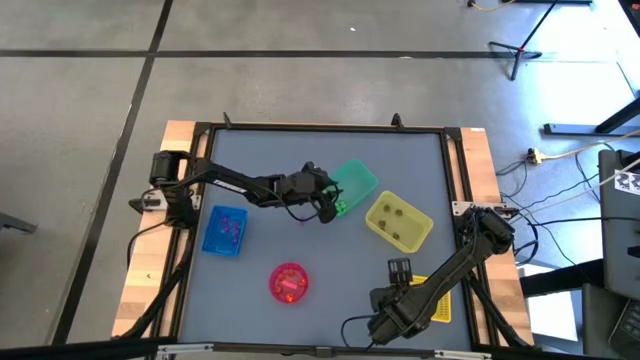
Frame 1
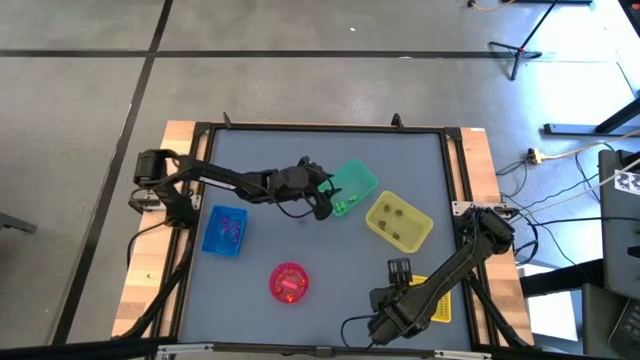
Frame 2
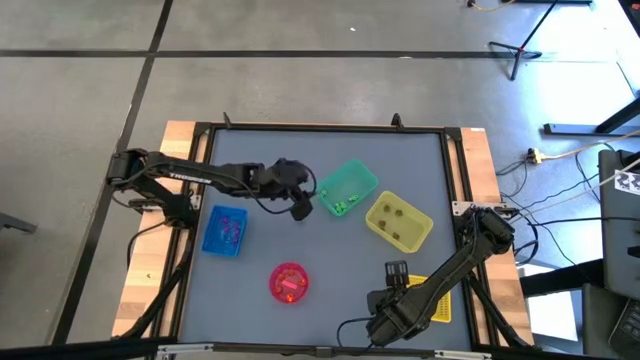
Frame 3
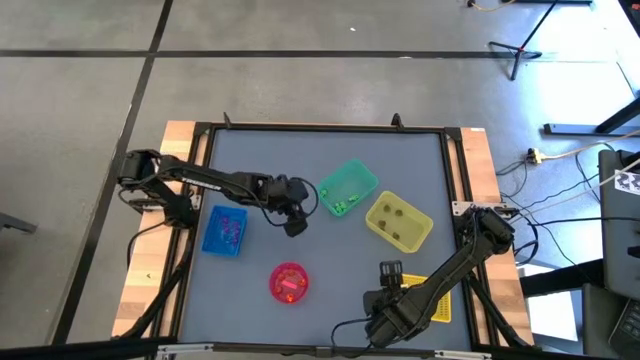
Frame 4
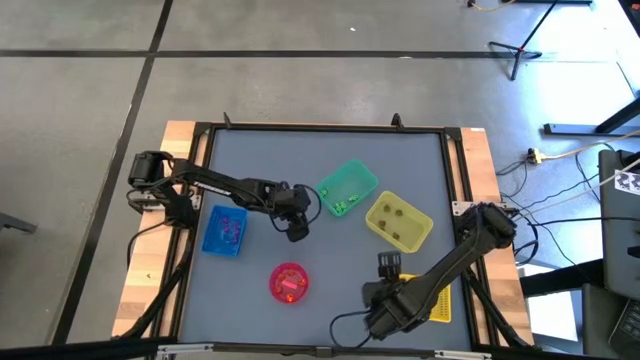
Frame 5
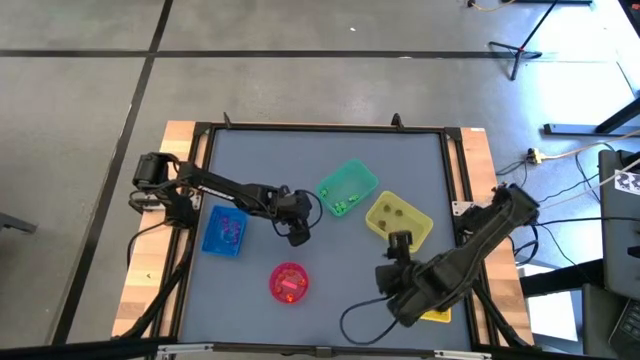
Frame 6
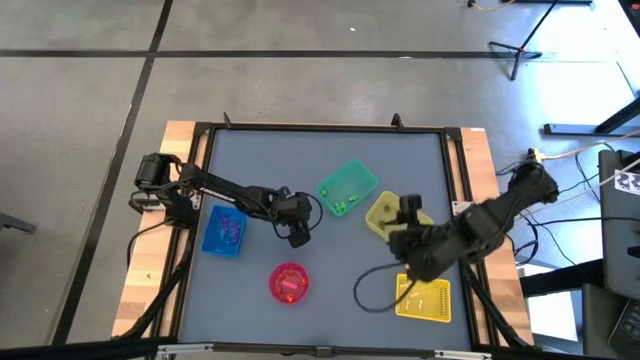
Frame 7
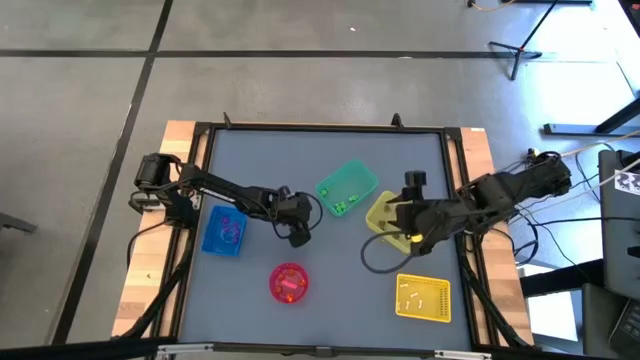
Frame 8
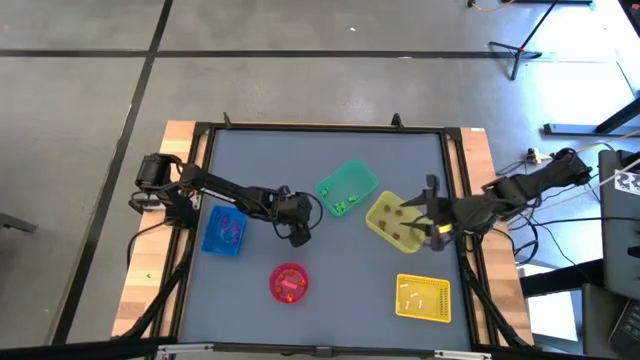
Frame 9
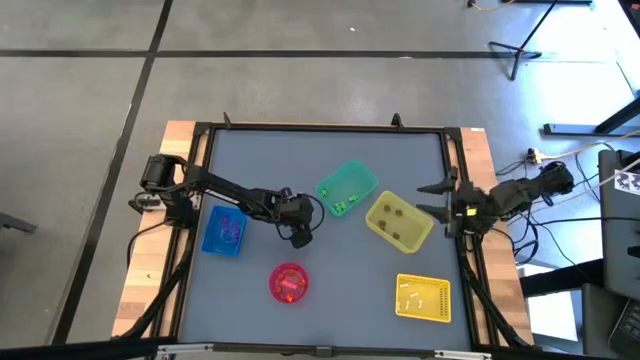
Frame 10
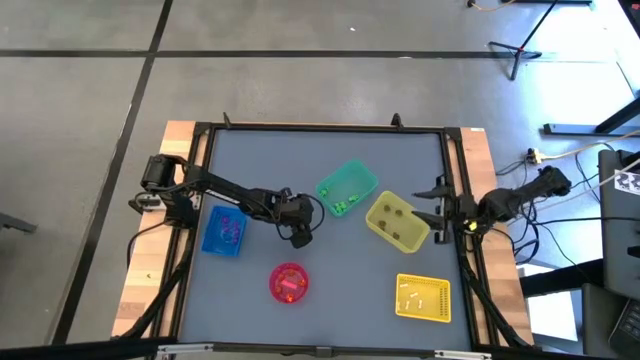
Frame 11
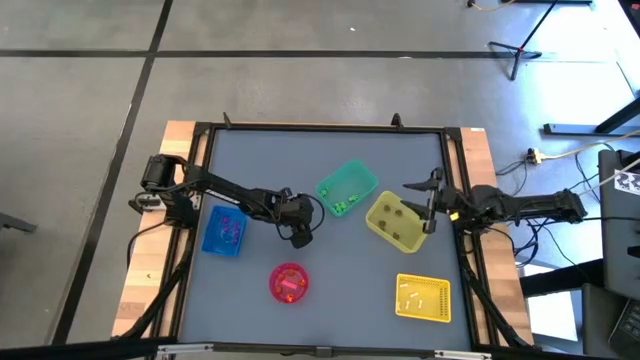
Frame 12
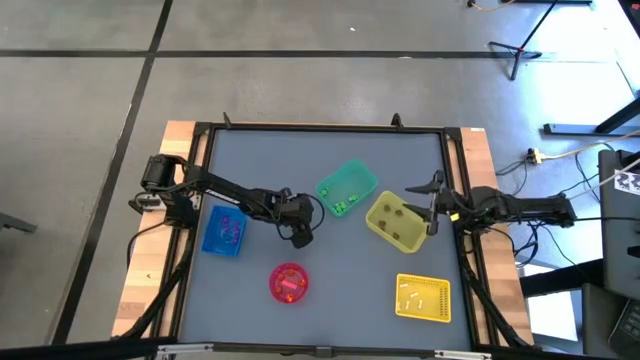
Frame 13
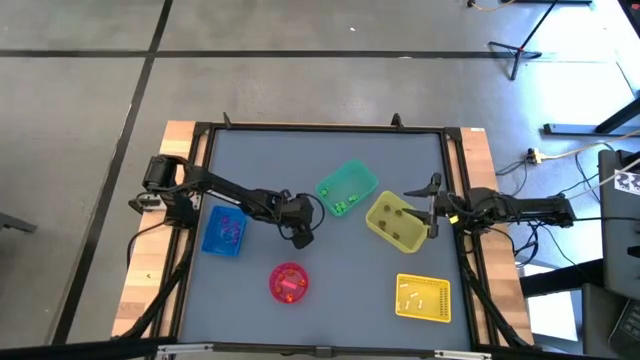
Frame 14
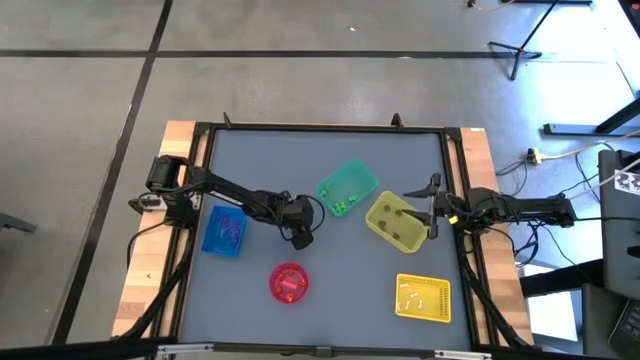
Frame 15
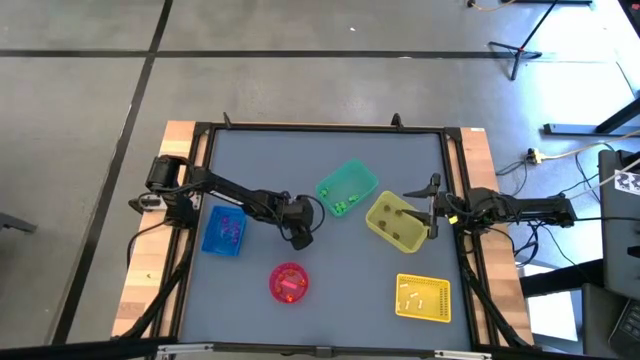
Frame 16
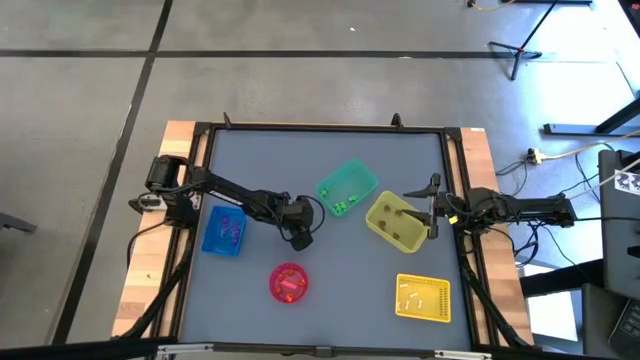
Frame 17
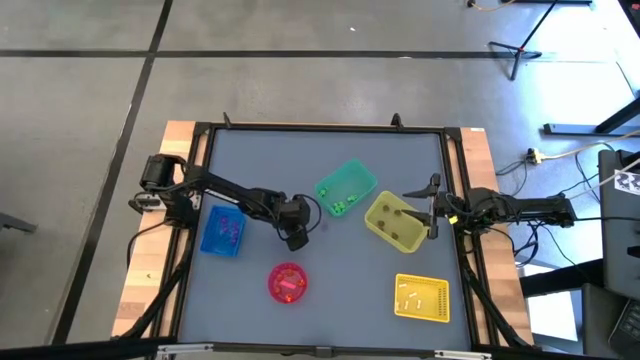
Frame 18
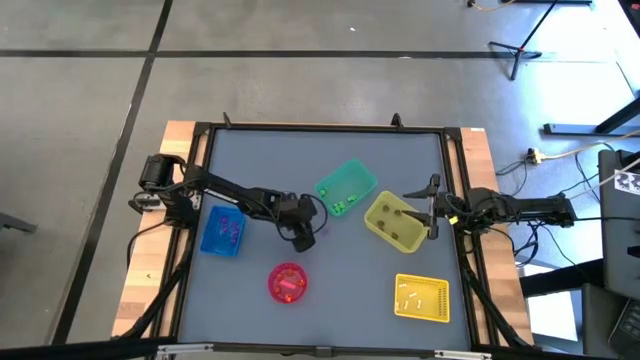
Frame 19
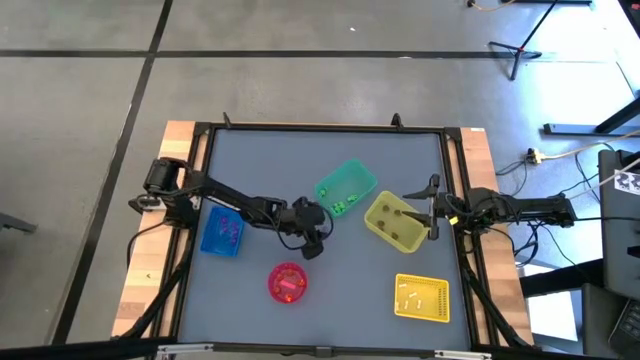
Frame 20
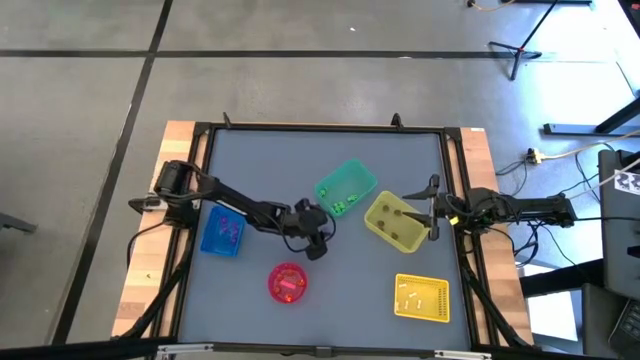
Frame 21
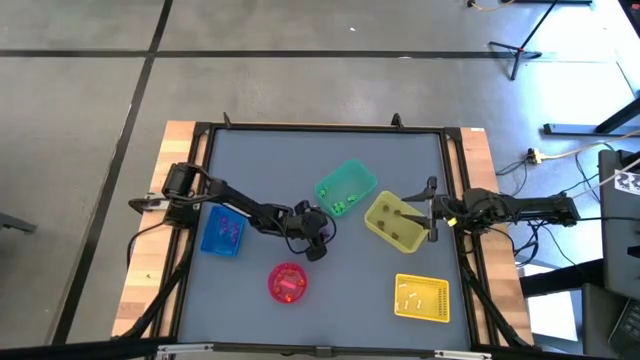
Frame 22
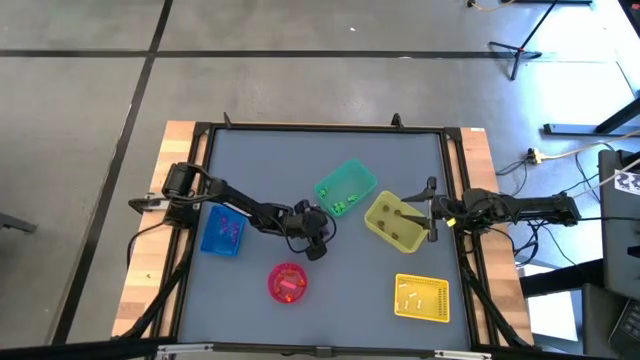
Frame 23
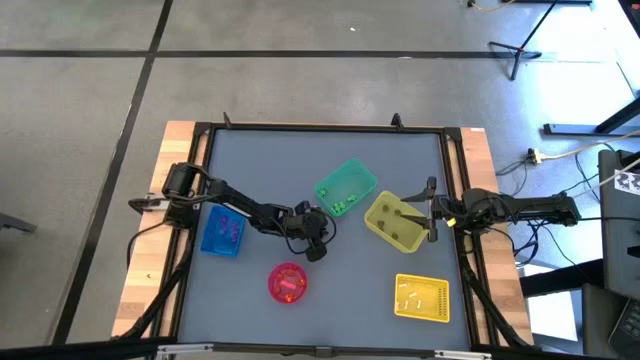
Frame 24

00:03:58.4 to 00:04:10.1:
Task: Sort Halloween decoration
Put the violet spider toy into the blue bin

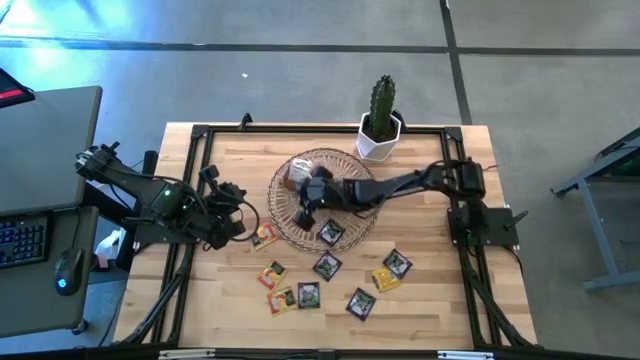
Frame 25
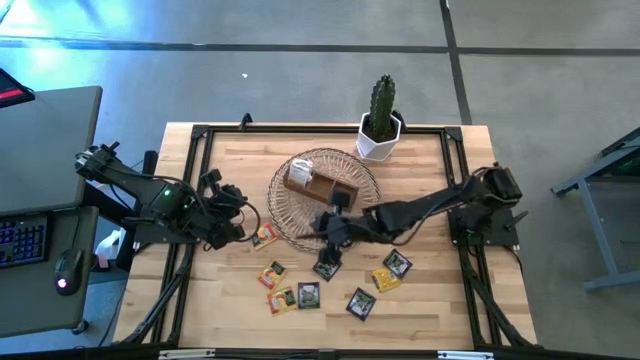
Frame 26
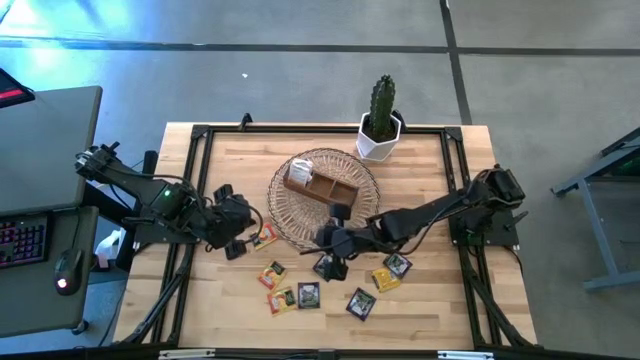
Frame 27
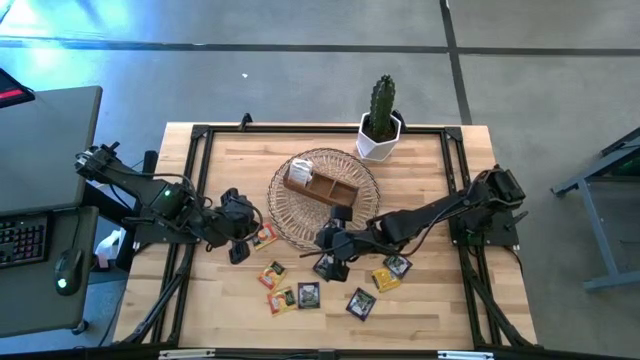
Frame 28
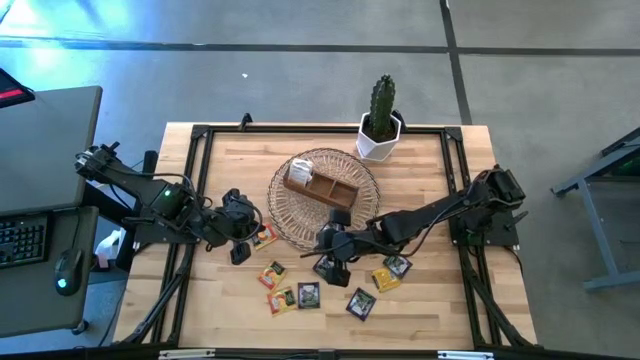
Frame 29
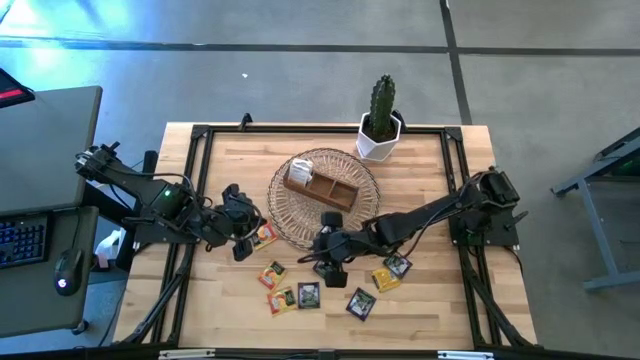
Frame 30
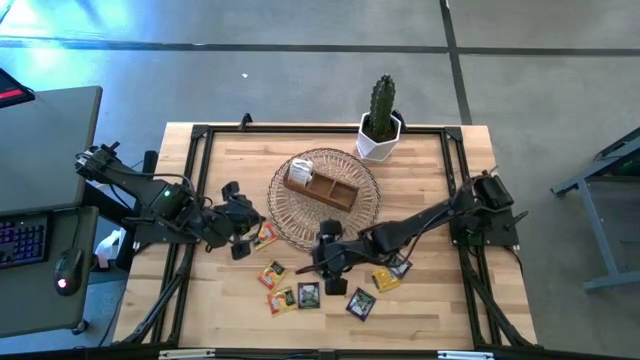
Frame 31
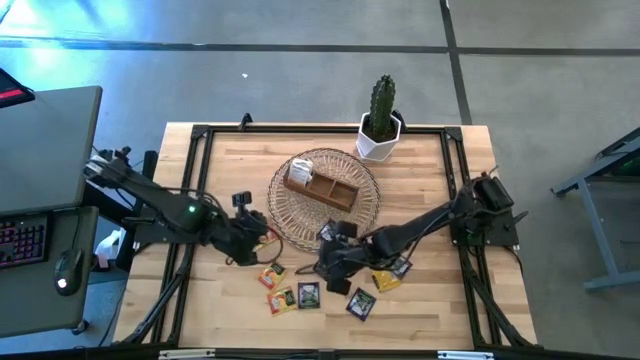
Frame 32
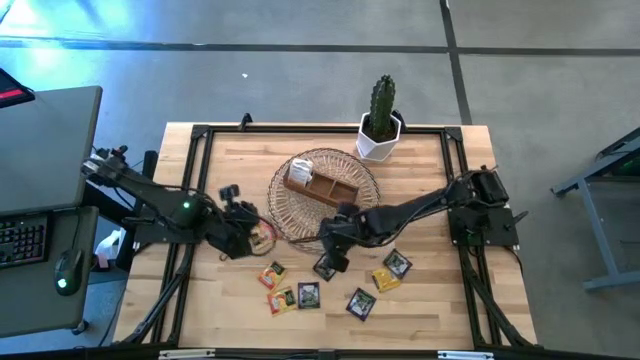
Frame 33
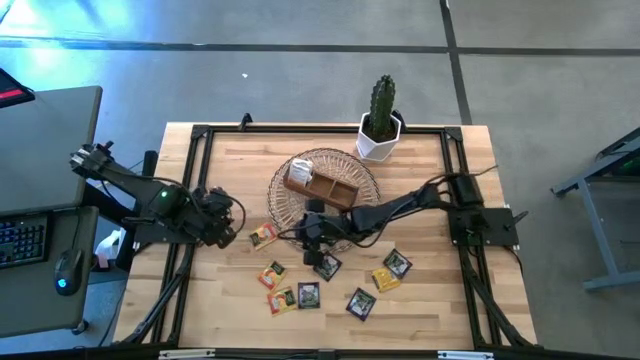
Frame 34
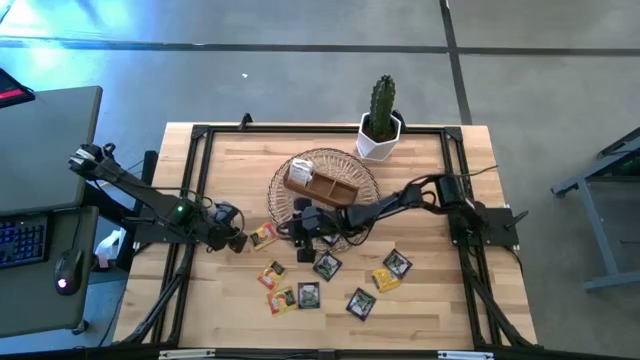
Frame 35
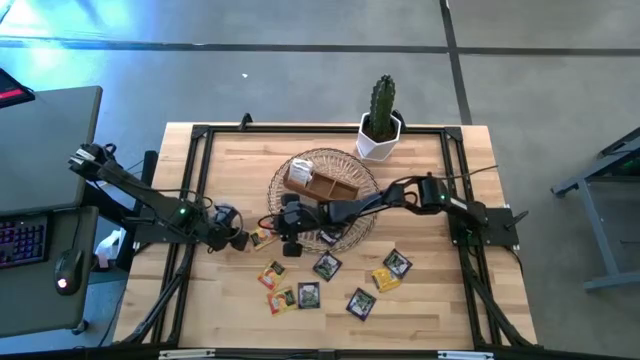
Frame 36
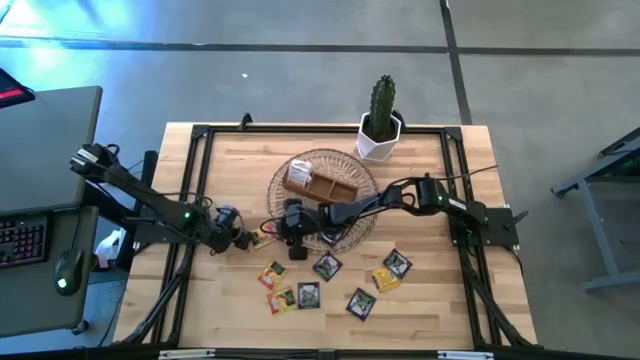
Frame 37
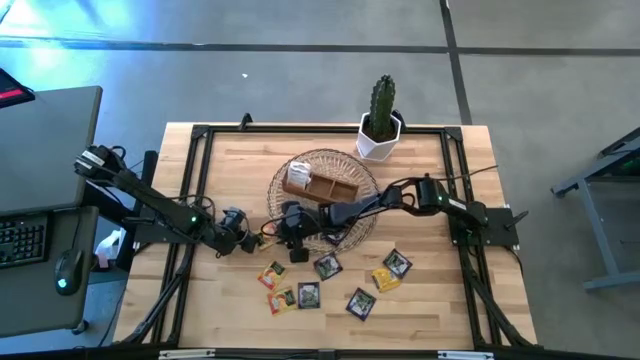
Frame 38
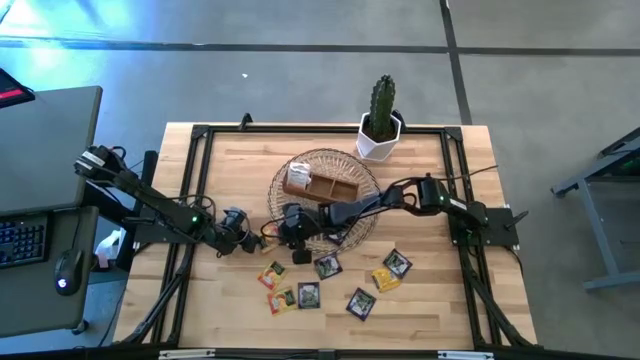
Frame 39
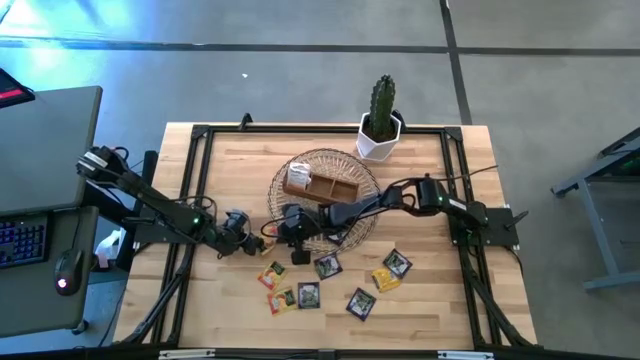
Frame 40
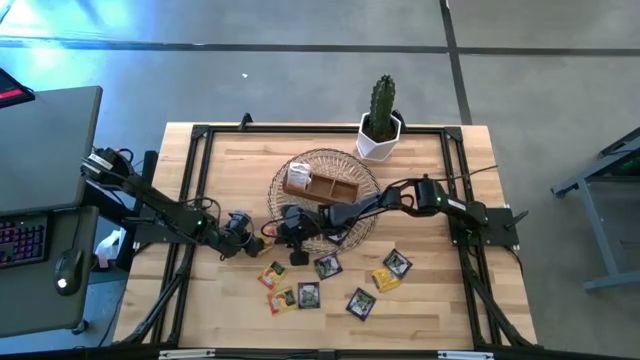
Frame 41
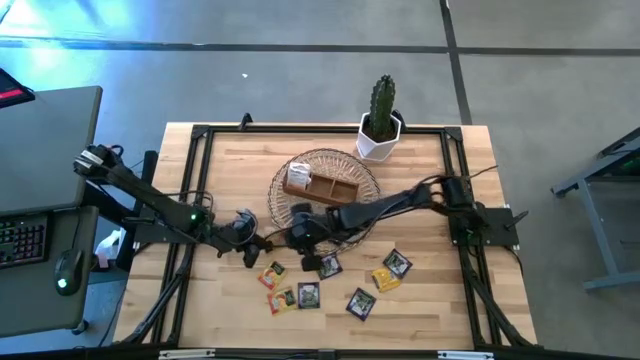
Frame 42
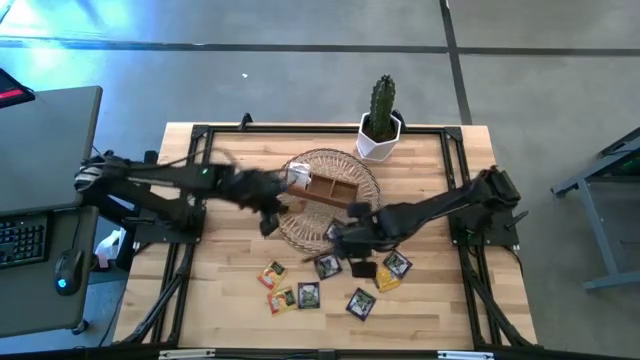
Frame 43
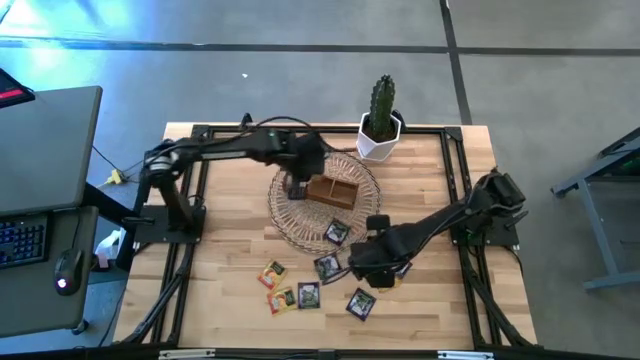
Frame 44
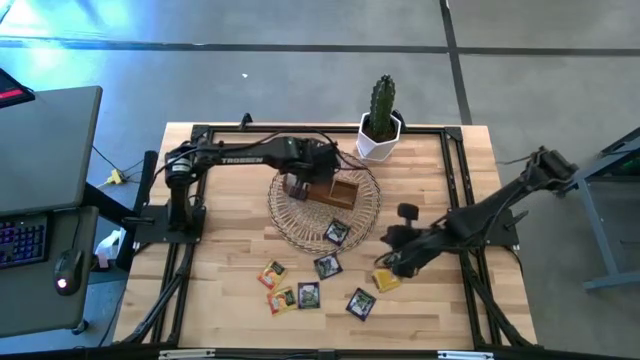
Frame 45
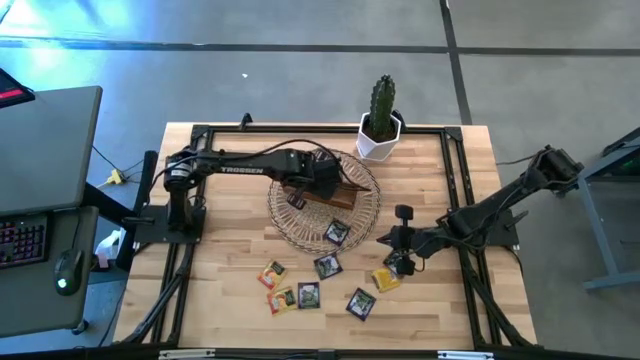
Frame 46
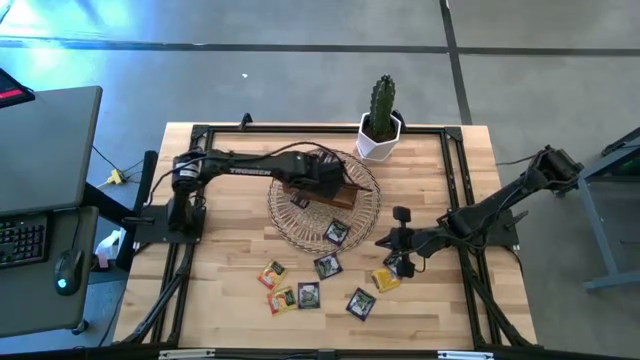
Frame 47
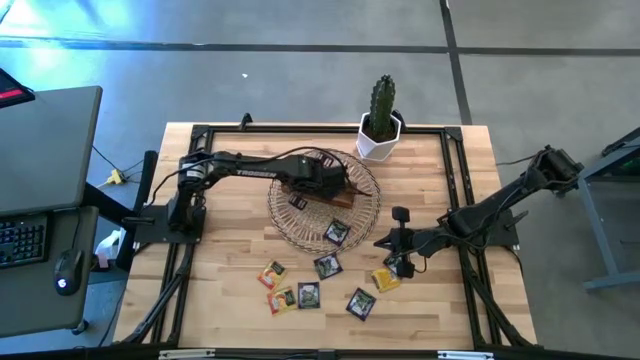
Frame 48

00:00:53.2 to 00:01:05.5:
Task: Pick & Place Tea
Put the yellow tea pack into the middle section of the wooden organizer
